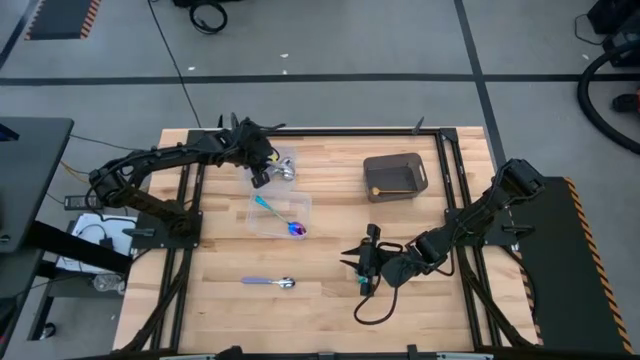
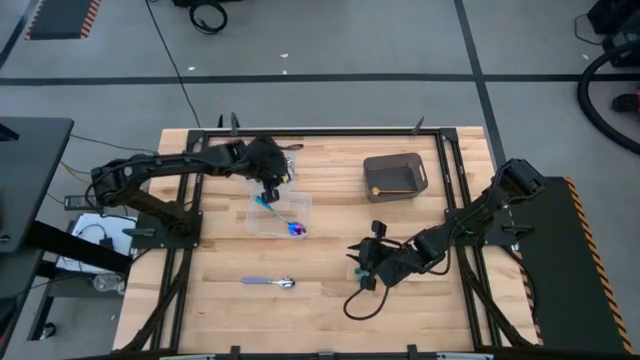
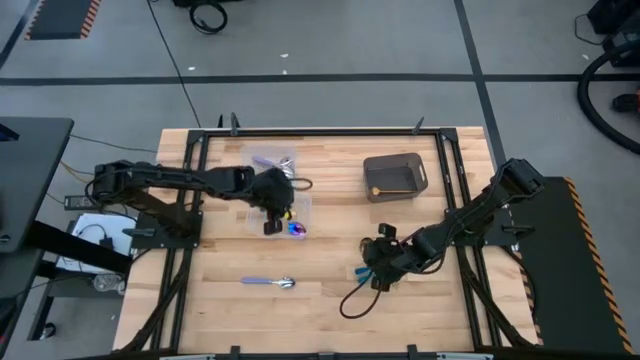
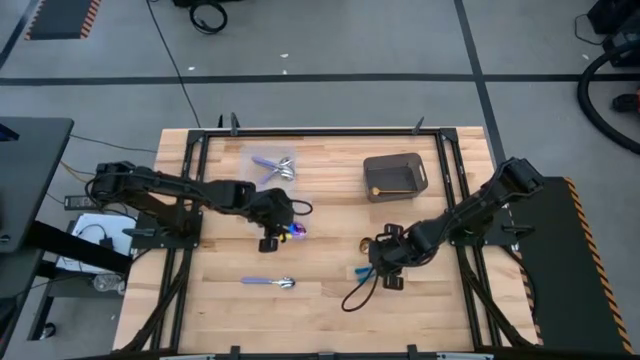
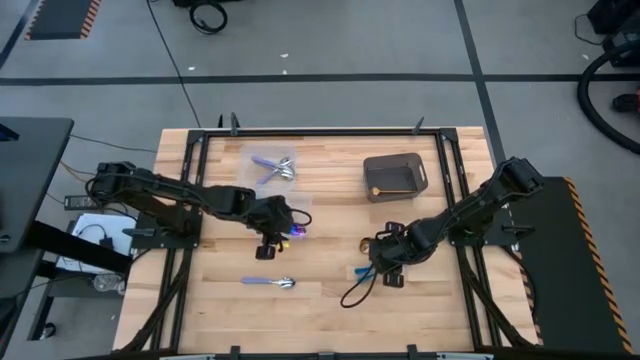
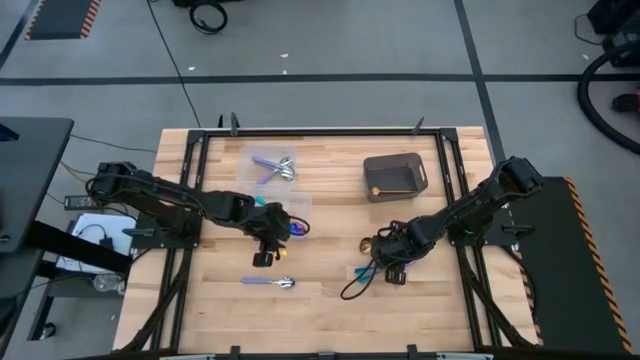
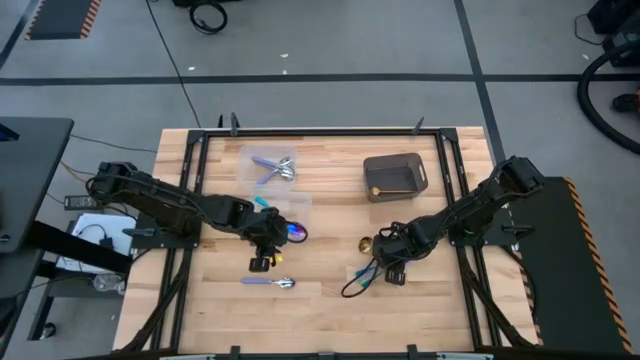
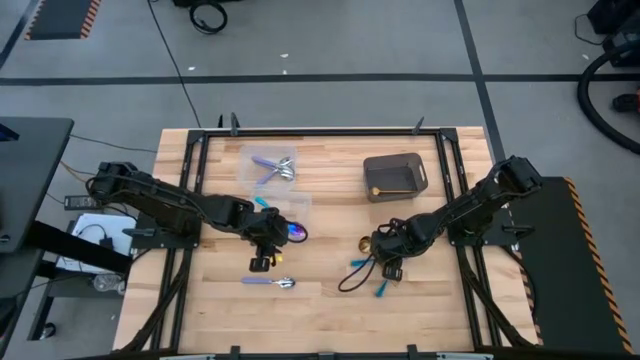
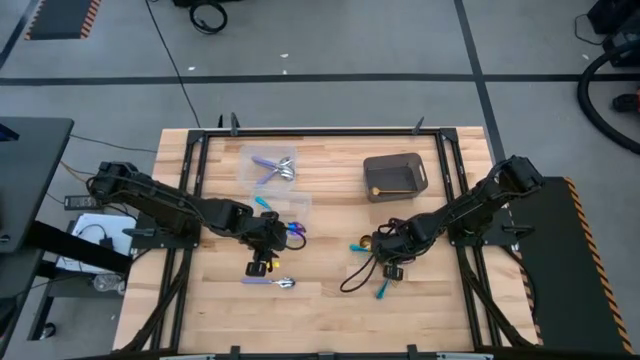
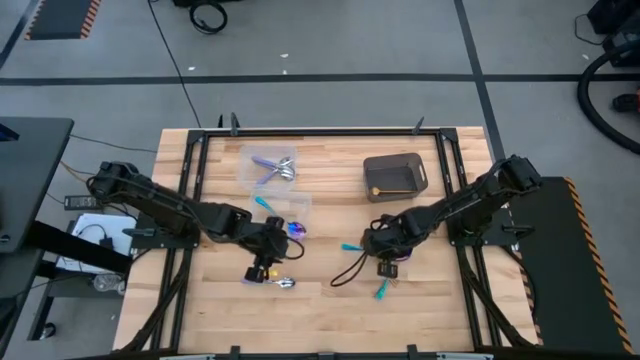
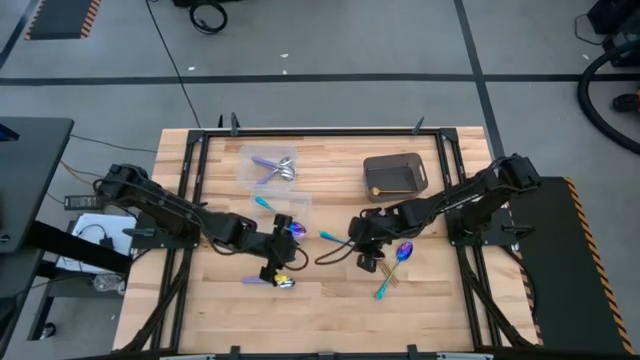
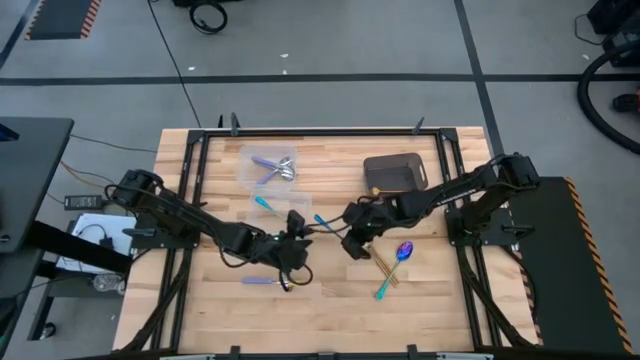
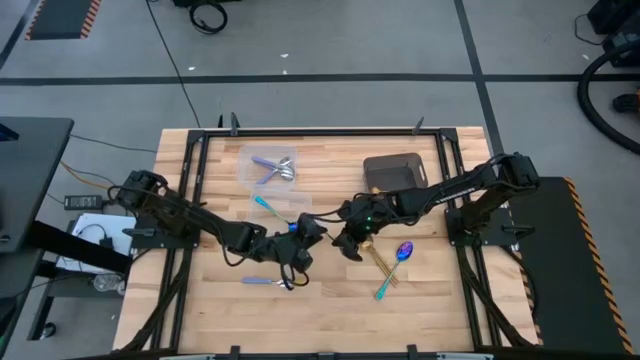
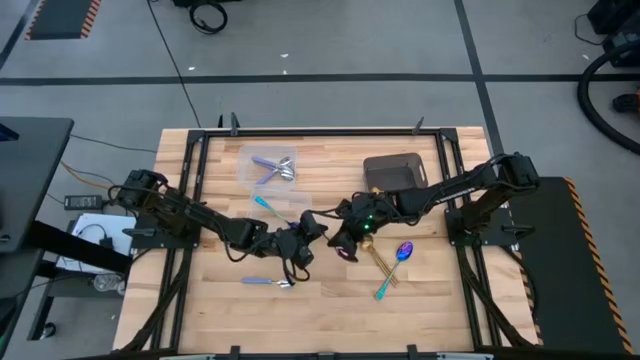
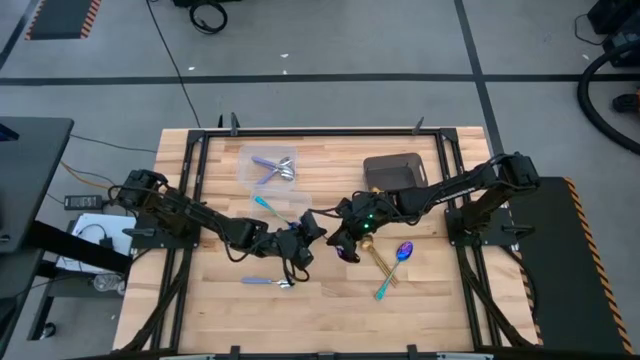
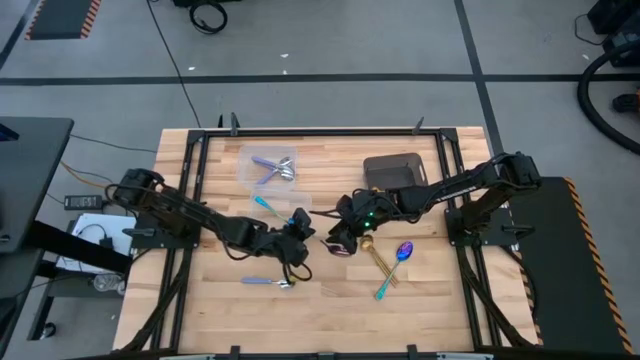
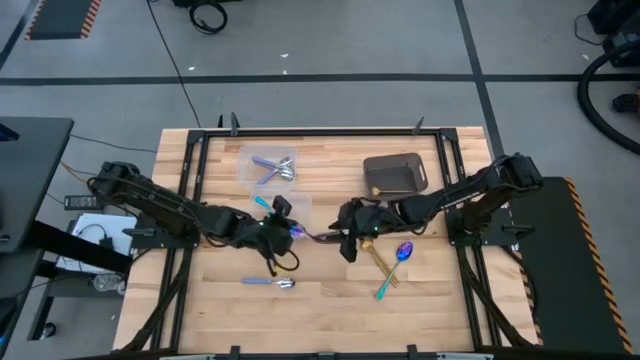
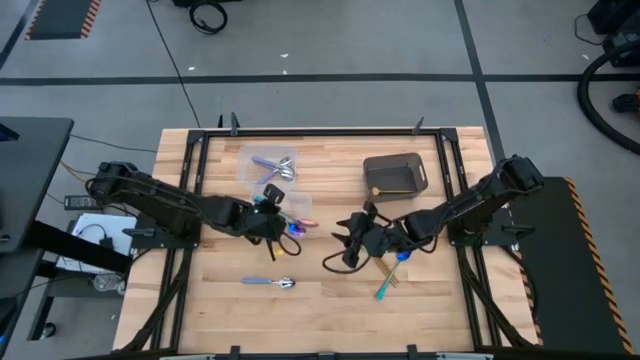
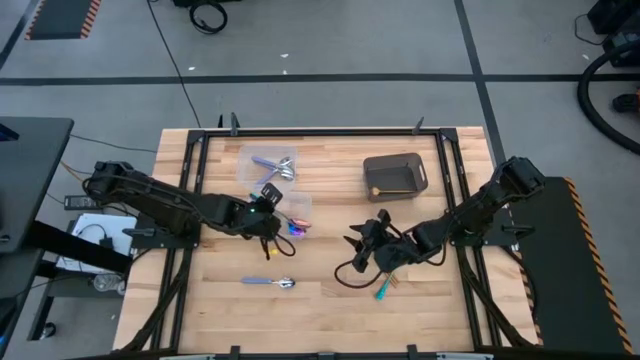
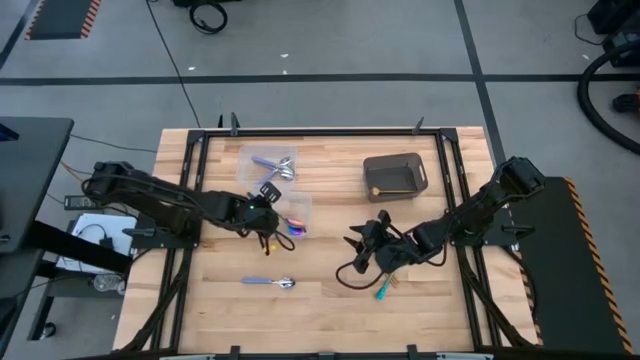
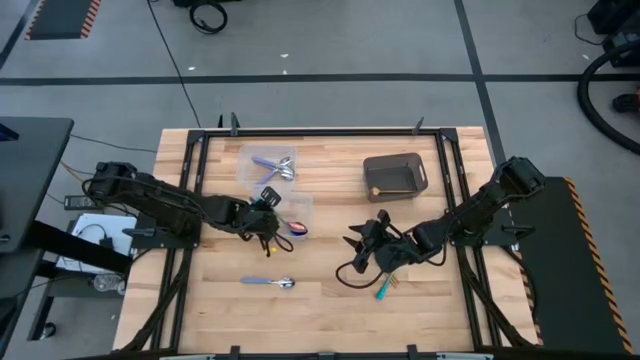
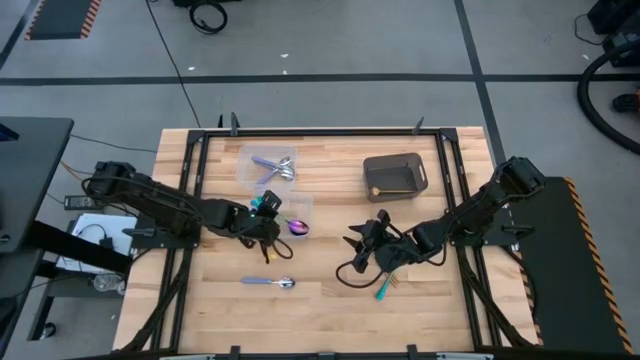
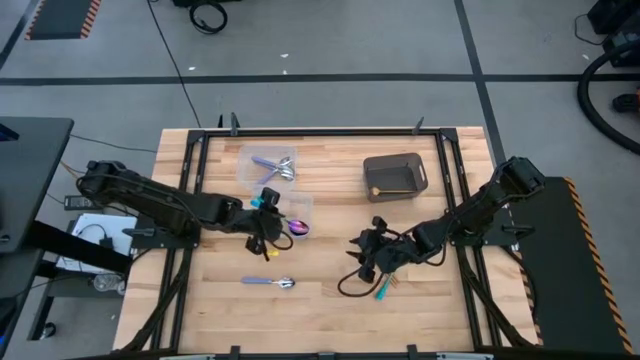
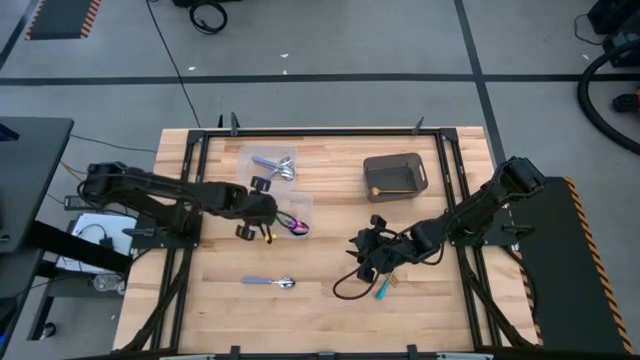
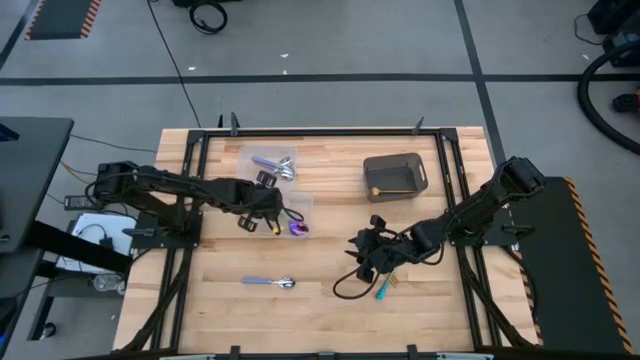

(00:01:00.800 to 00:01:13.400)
Task: Sort silverware by color (type)
Put the blue spoon into the bottom transparent bin

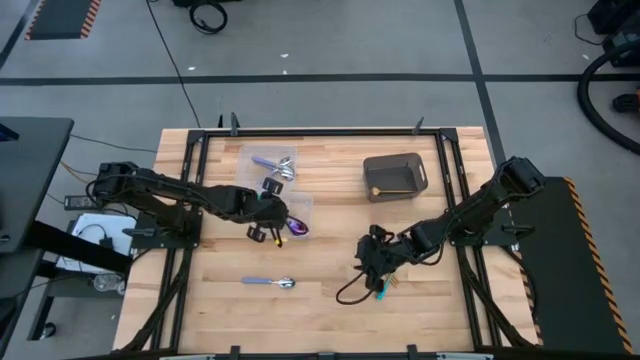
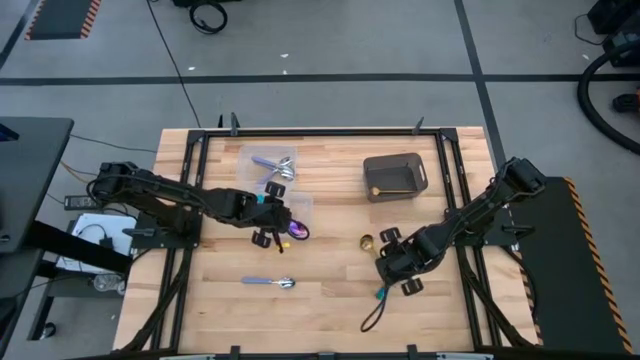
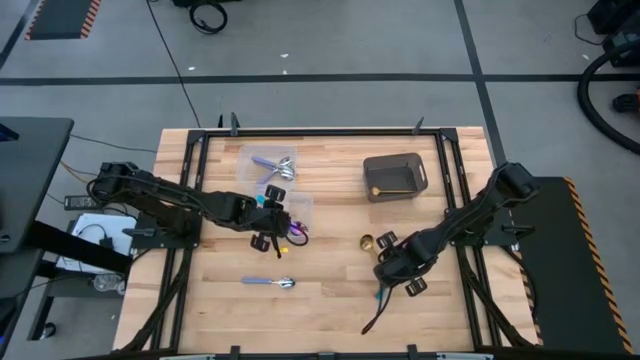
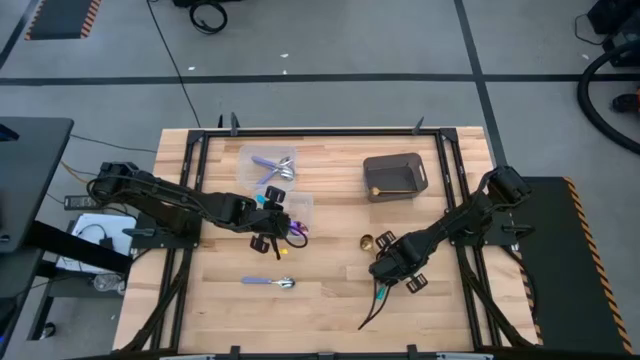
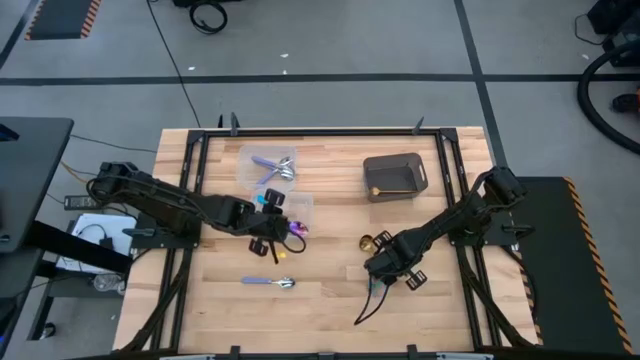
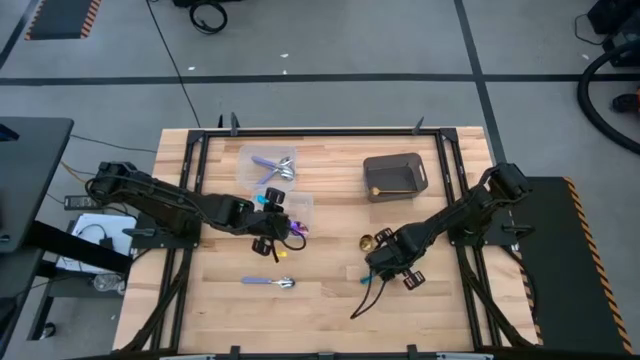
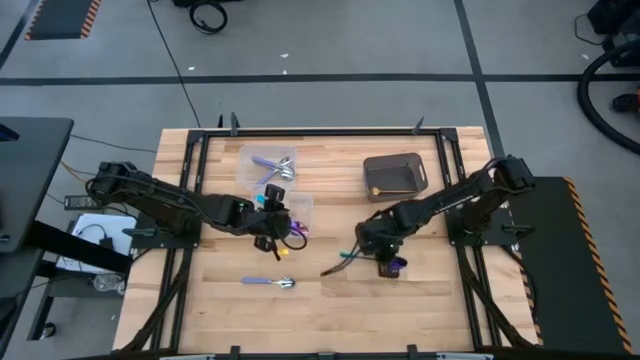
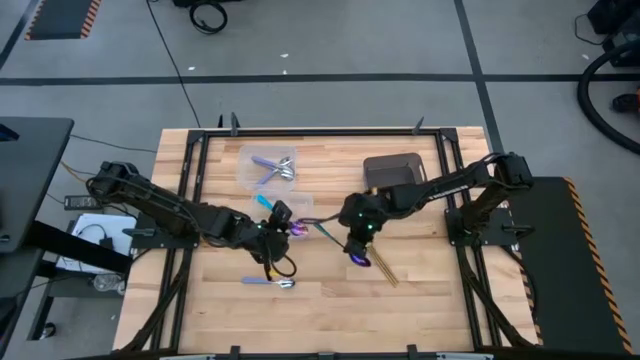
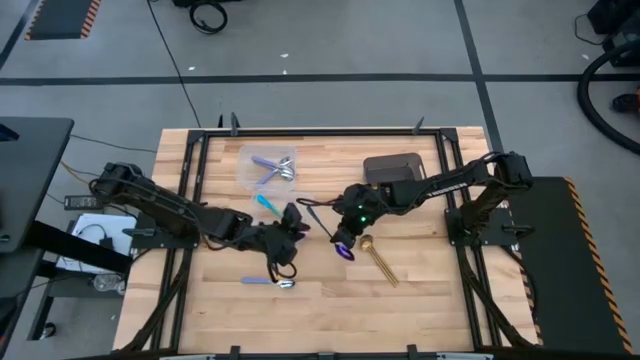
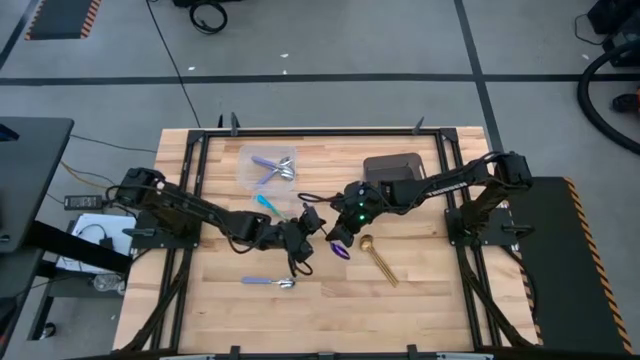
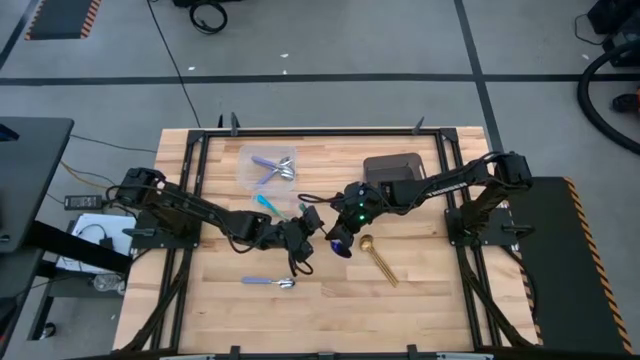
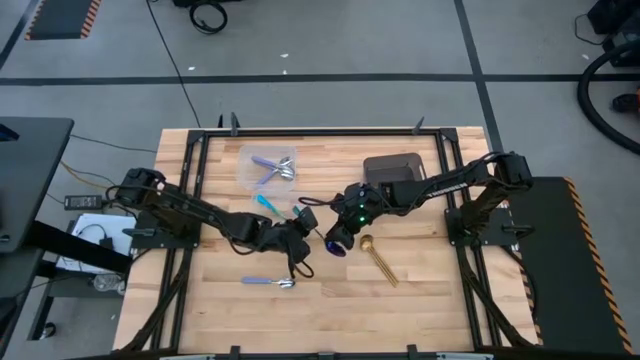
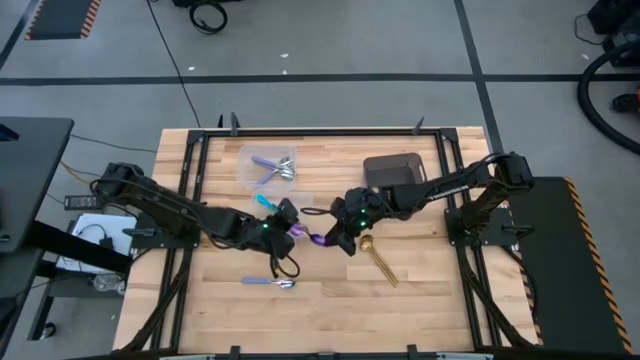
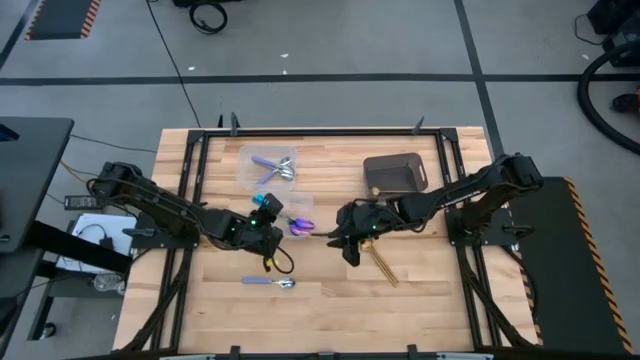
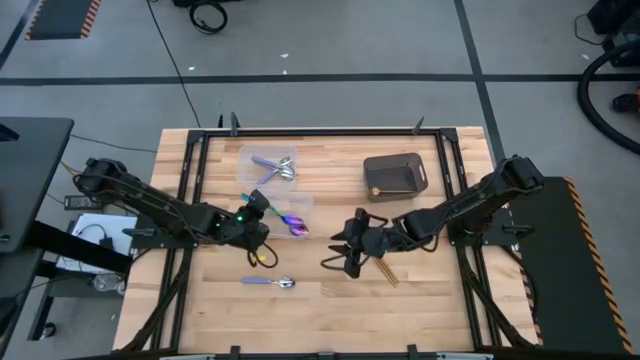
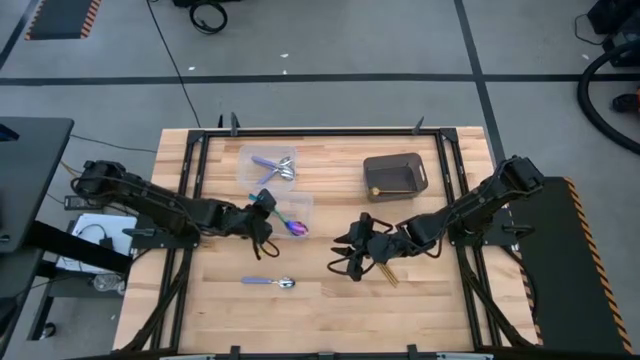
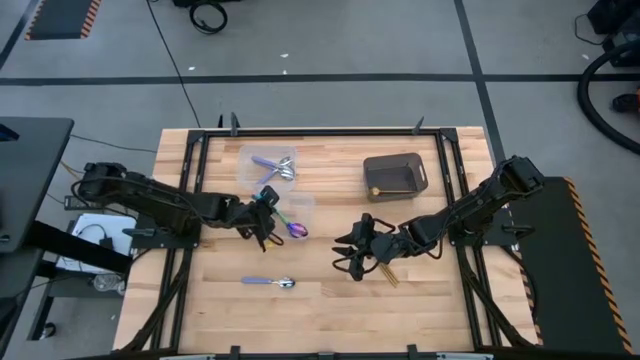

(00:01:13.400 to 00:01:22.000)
Put the blue spoon into the bottom transparent bin

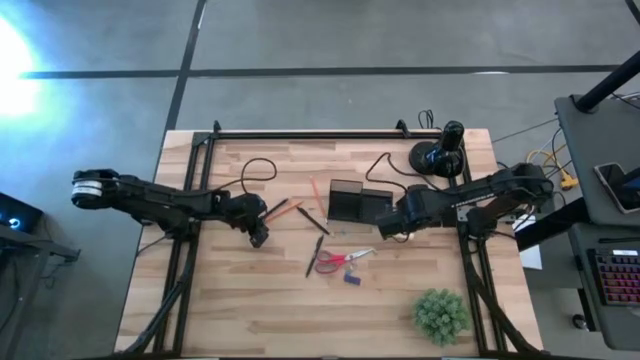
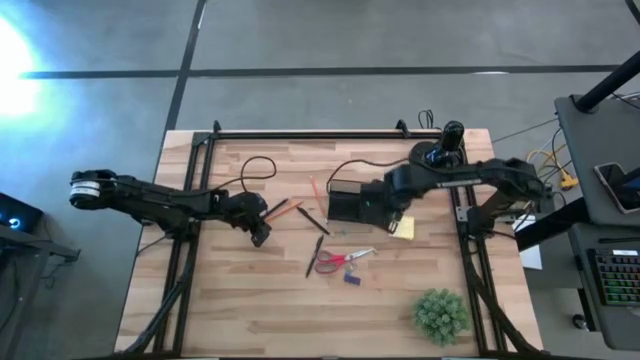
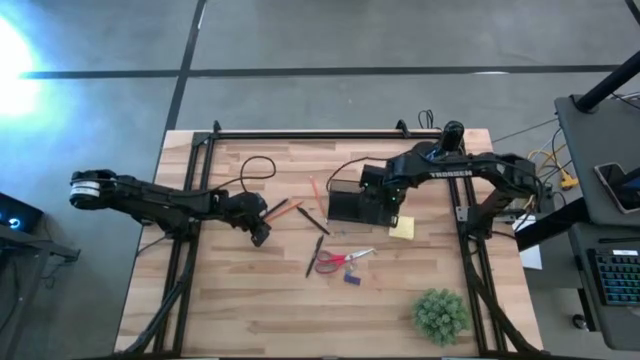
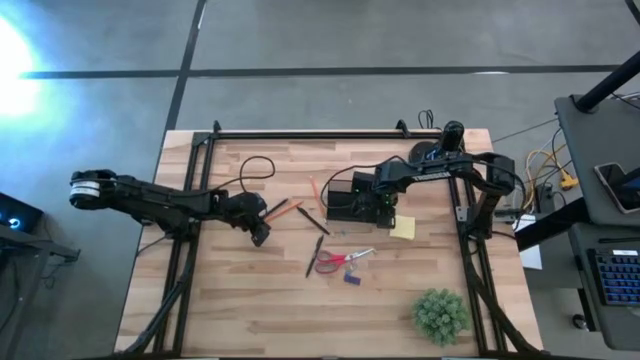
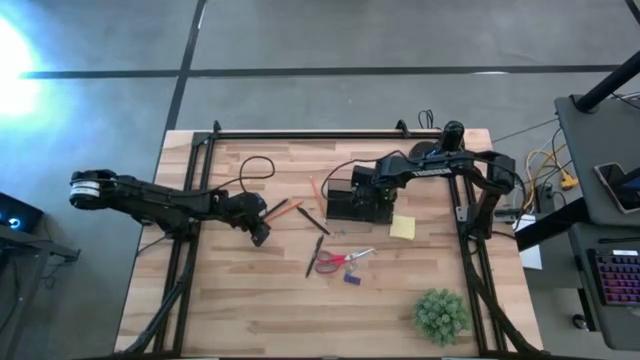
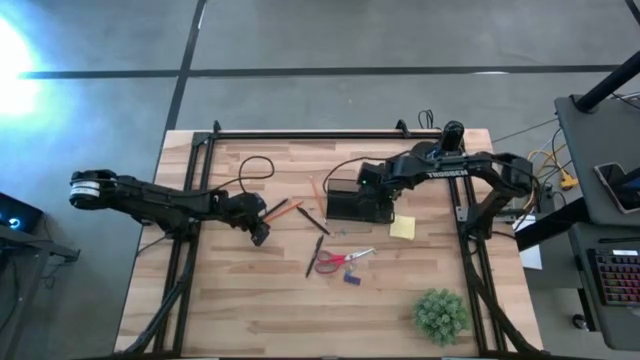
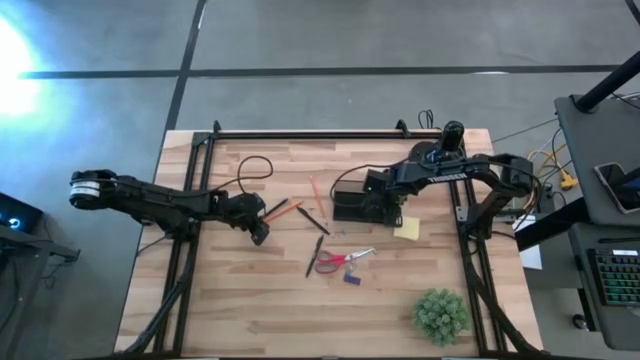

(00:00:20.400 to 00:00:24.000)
Task: Pick and place office supplies into organizer
Remove the blue binder clip from the desk organizer
